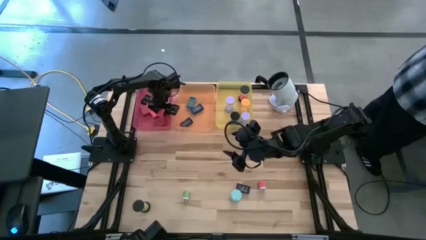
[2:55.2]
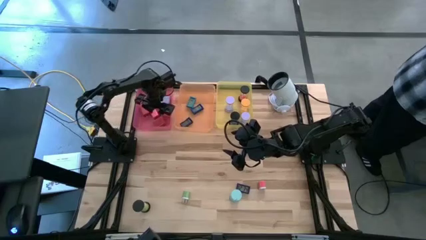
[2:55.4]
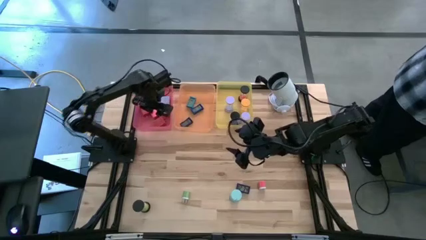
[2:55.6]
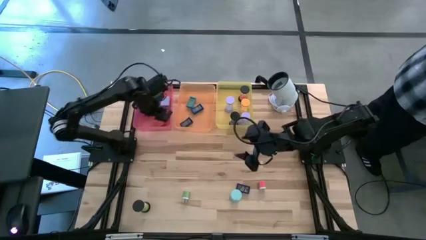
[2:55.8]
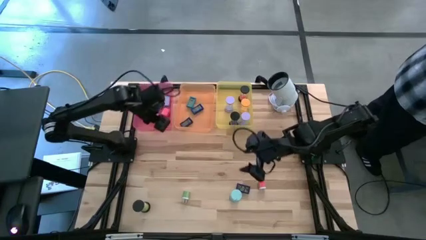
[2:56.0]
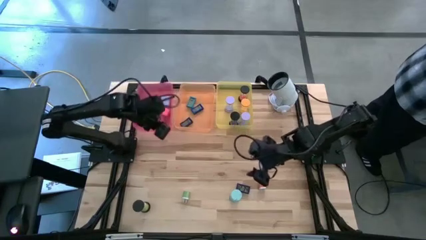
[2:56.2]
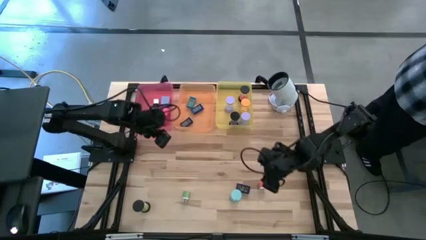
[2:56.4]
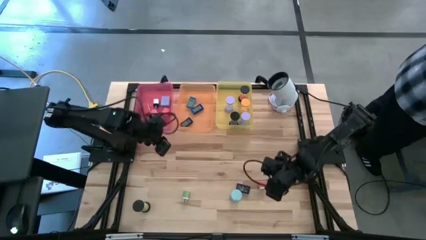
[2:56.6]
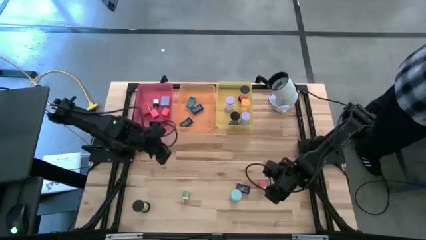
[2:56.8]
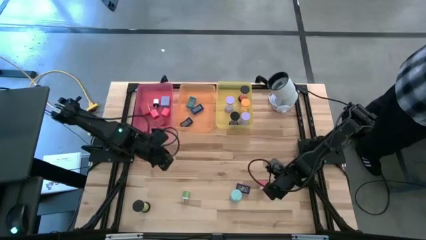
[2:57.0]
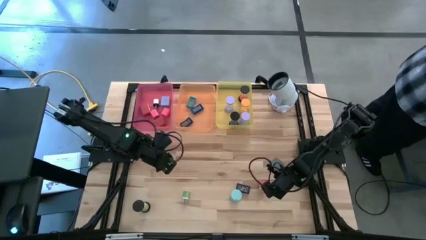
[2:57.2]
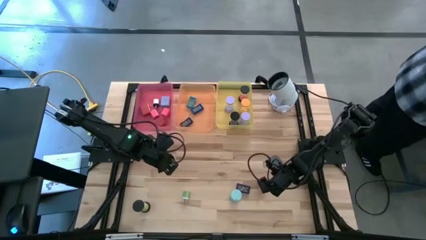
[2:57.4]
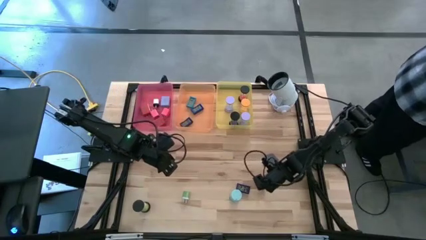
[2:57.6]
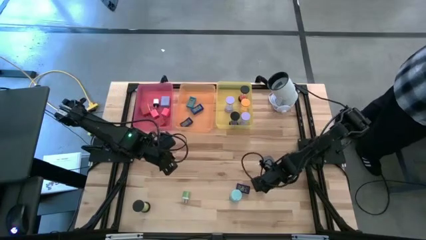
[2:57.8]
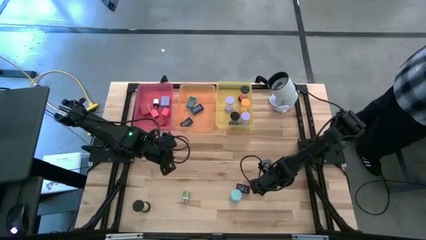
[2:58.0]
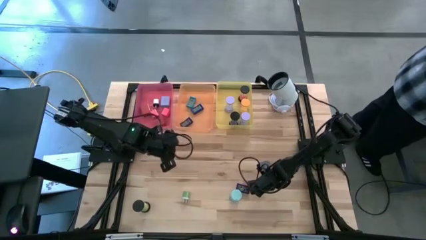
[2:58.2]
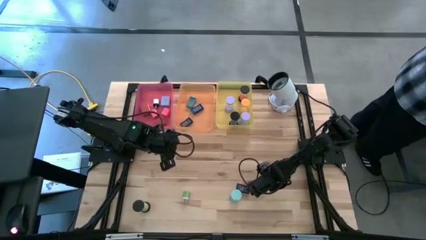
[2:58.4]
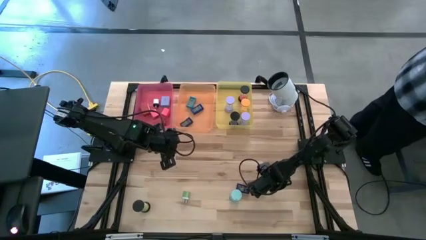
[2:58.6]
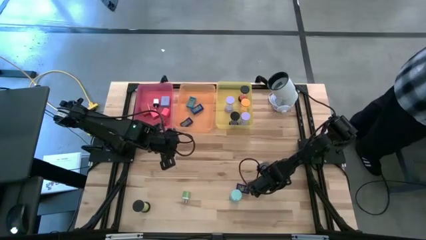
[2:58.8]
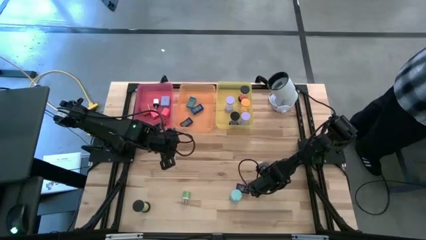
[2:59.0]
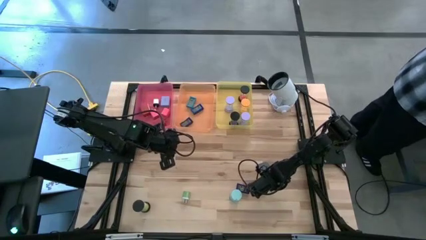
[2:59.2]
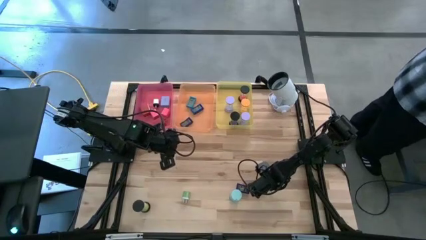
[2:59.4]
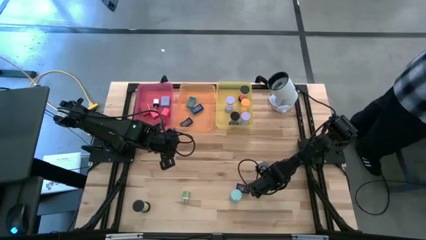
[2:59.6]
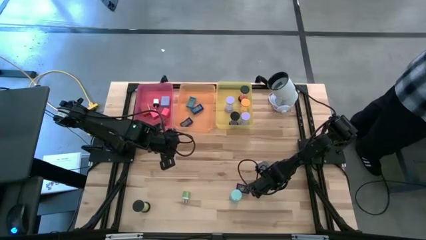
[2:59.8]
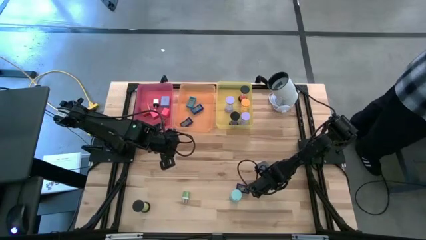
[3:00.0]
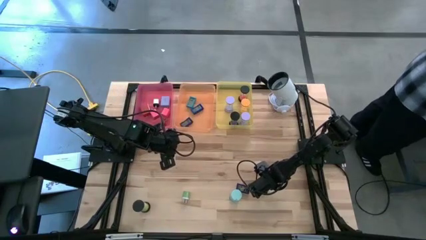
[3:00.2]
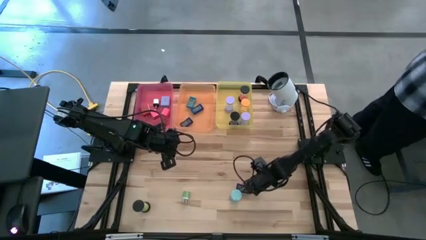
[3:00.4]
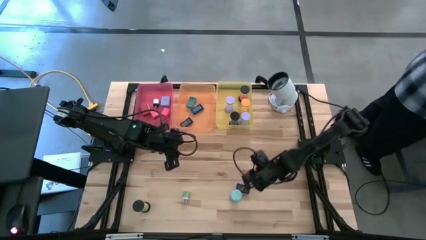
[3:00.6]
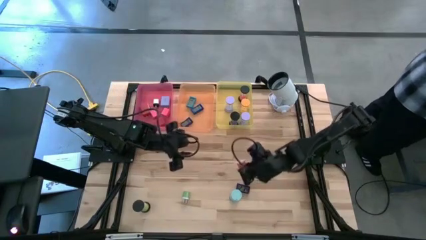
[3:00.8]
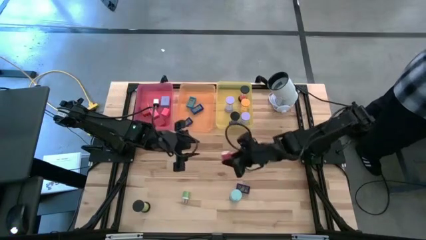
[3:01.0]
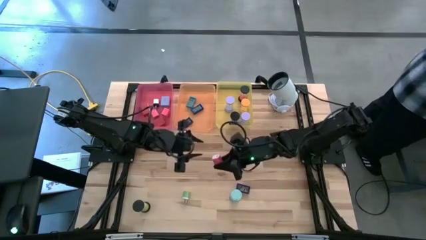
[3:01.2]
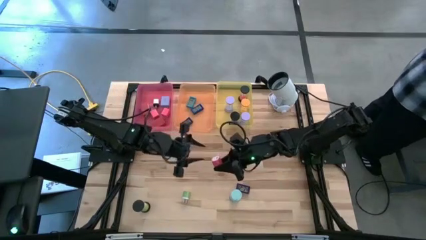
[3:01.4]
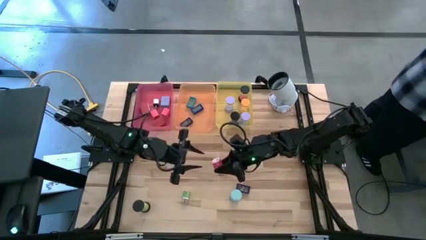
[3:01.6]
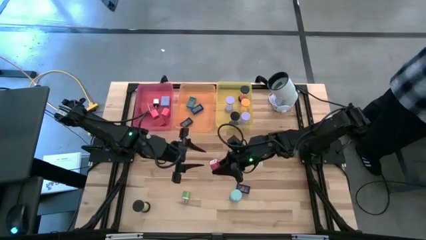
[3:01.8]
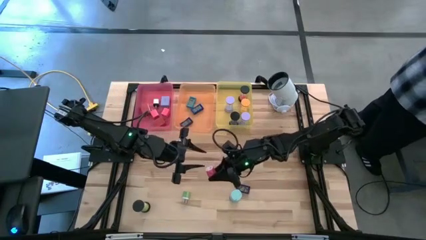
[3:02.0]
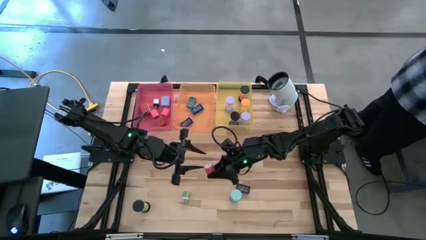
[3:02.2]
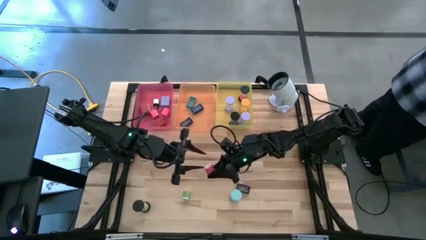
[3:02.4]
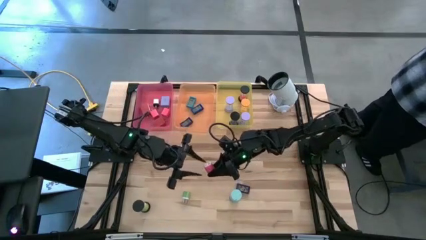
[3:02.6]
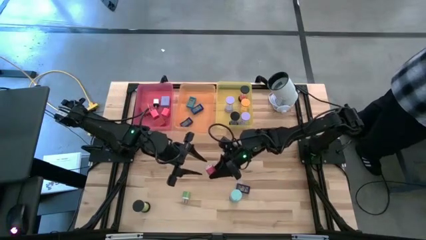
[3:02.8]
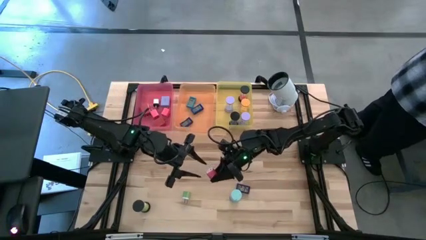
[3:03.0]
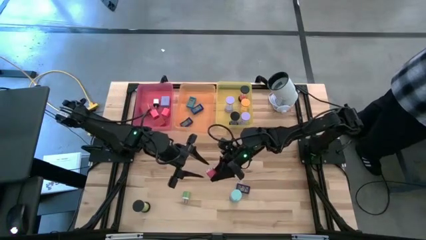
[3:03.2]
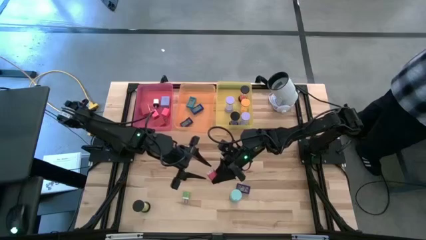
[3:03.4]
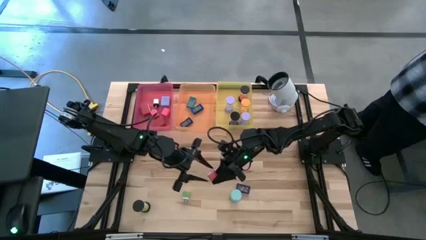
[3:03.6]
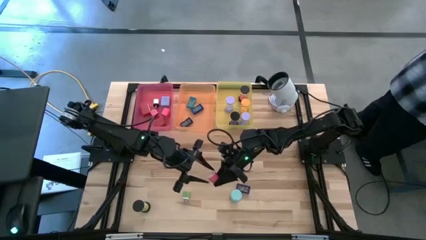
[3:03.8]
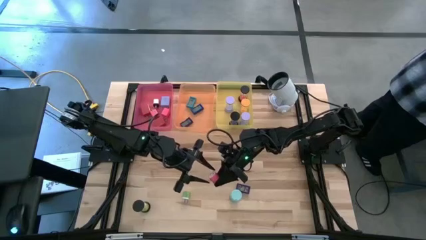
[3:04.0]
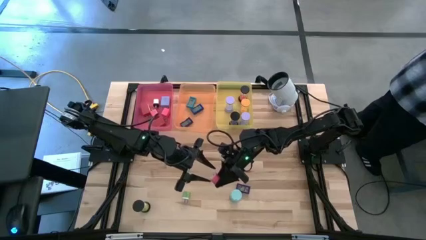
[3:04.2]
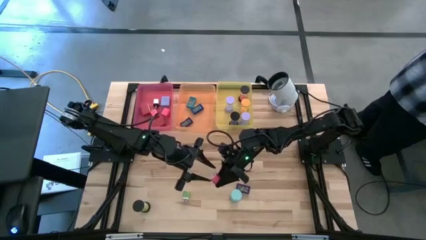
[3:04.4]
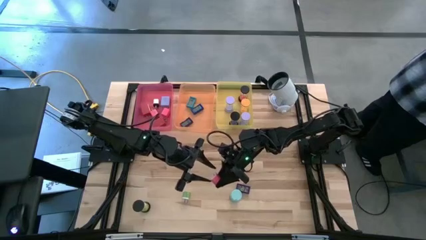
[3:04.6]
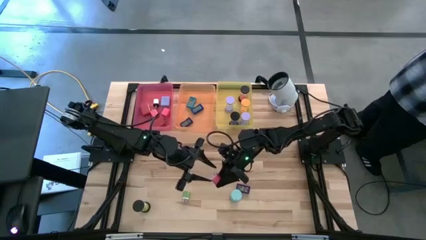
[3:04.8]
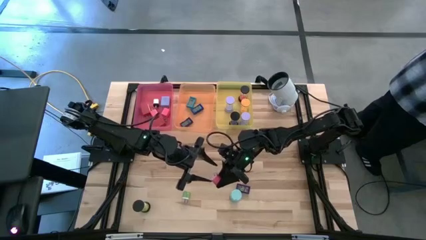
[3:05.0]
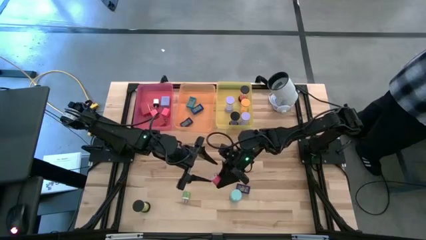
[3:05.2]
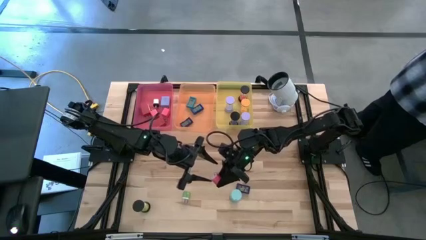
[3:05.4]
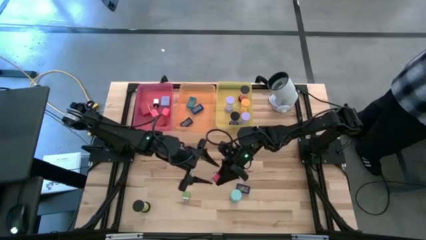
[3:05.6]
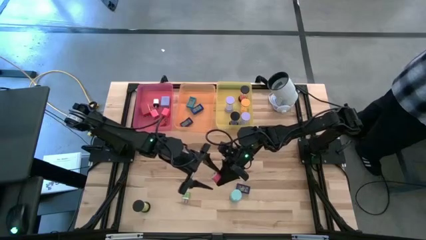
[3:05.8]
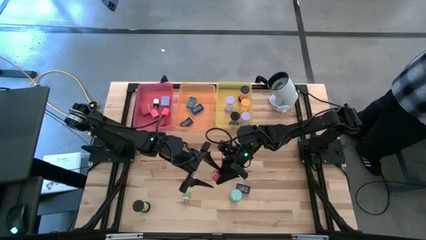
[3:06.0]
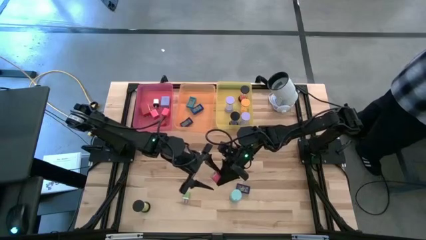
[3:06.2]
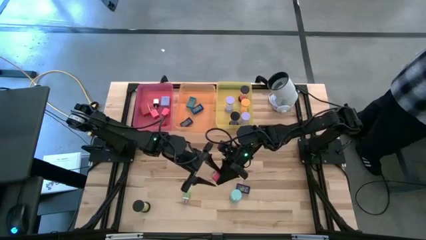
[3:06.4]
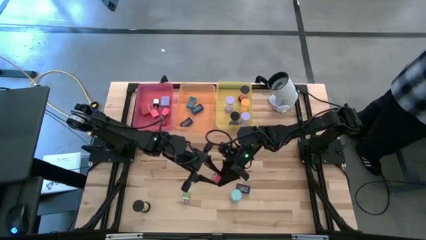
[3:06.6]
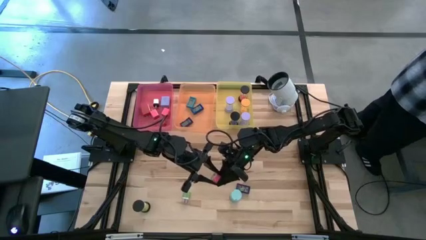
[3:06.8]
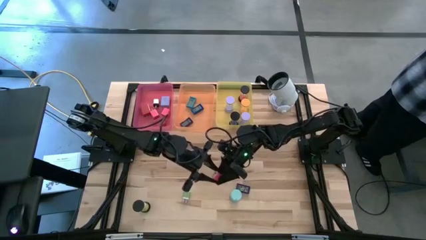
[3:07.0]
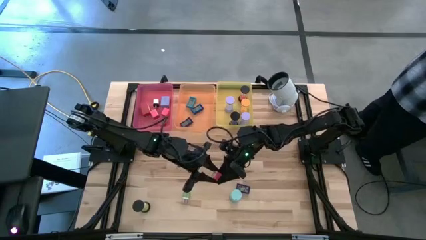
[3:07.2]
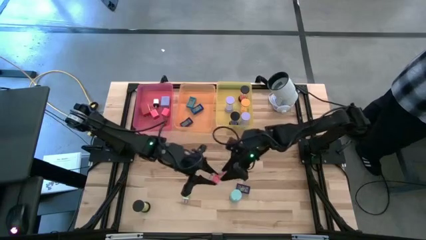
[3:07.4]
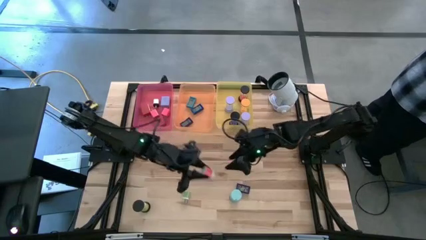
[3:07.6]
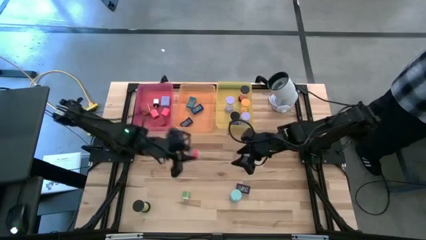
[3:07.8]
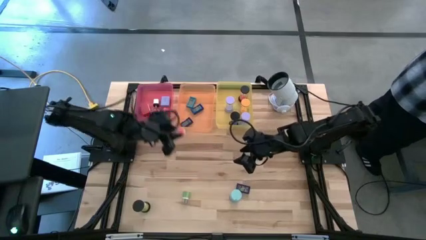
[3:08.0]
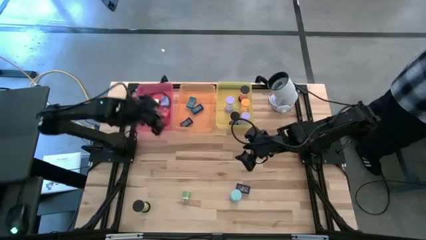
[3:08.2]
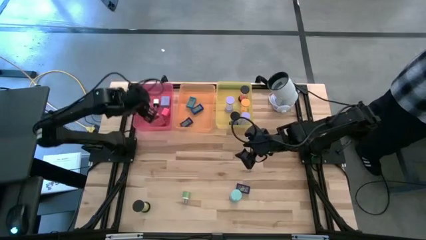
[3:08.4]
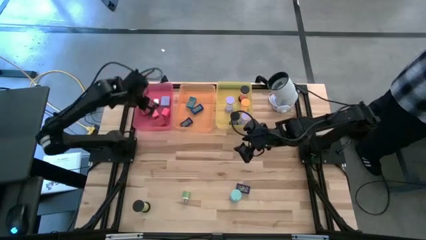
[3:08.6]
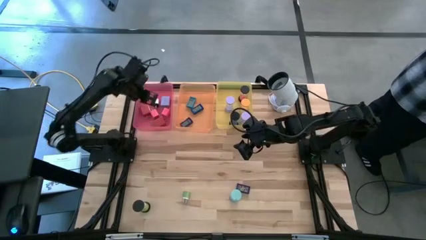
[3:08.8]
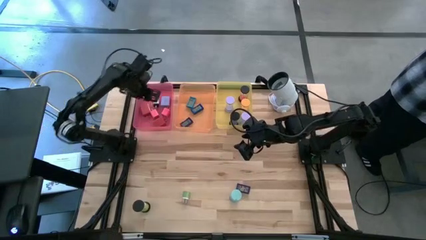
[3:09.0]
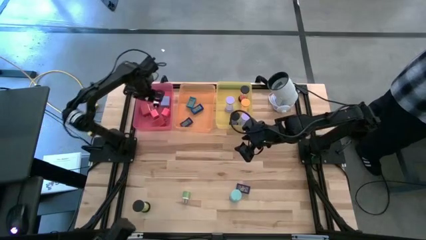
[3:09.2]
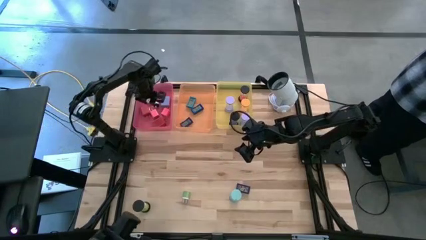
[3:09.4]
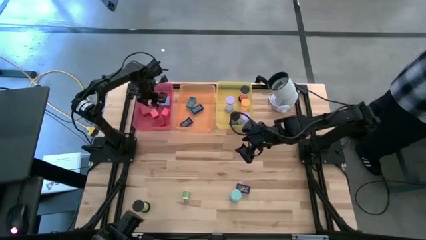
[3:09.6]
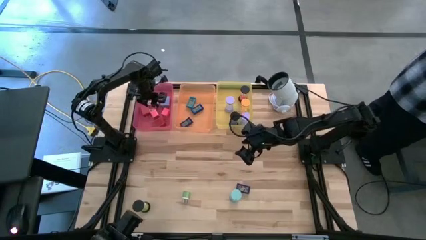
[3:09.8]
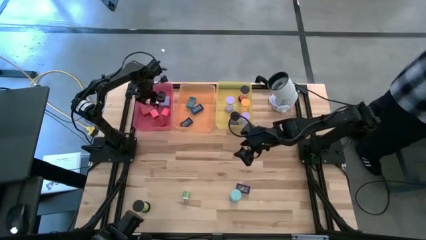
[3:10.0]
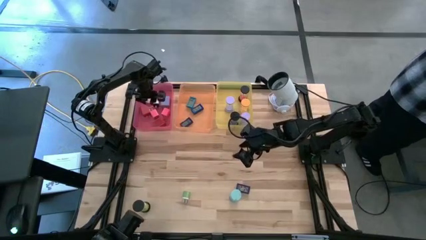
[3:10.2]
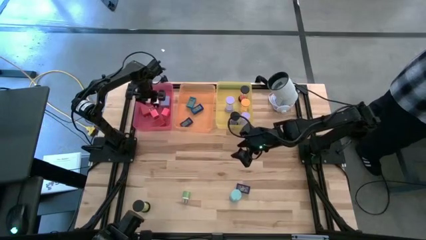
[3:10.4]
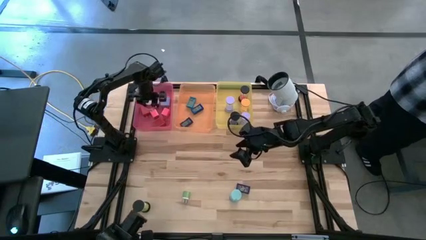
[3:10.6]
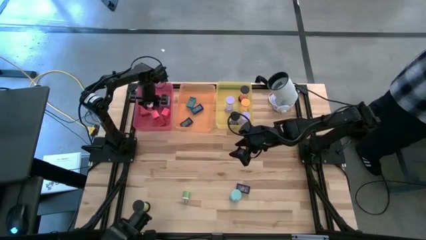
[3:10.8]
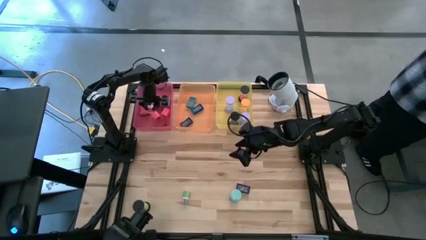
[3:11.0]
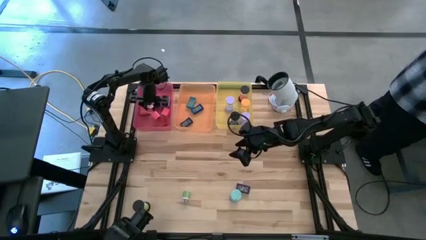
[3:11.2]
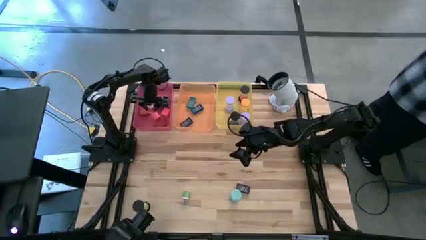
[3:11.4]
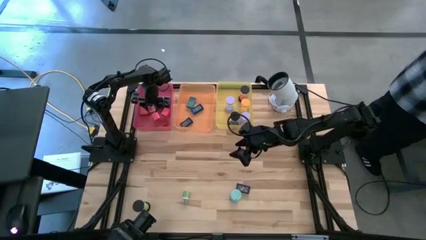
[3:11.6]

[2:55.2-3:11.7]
Task: Pick & Place Office items
Put the pink white charger adapter into the red bin

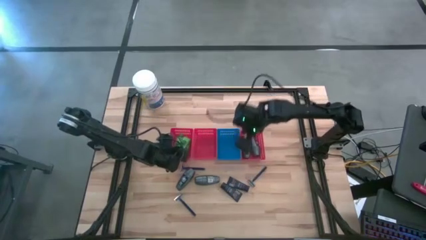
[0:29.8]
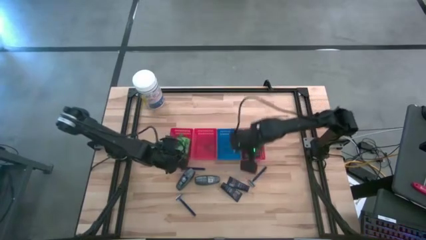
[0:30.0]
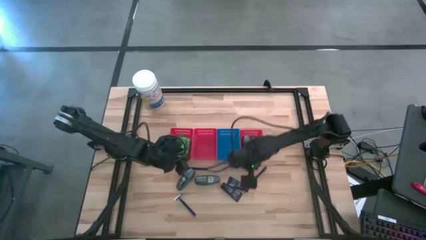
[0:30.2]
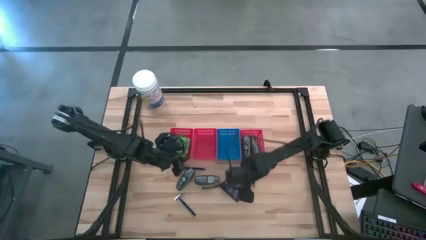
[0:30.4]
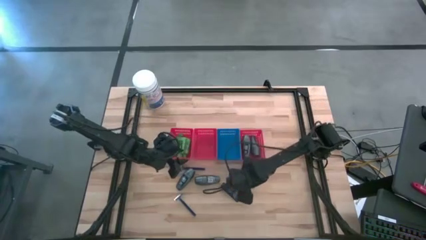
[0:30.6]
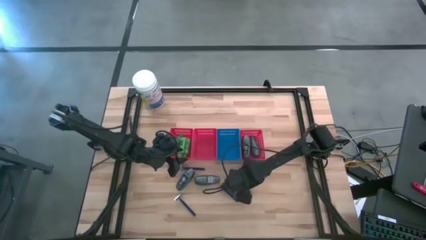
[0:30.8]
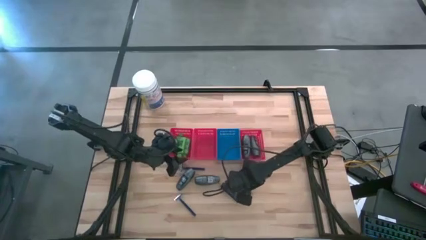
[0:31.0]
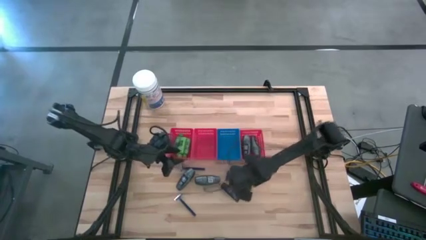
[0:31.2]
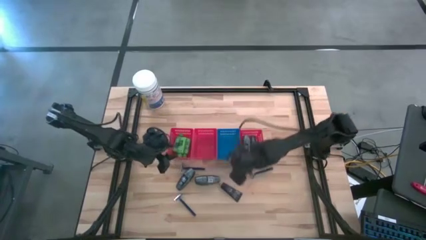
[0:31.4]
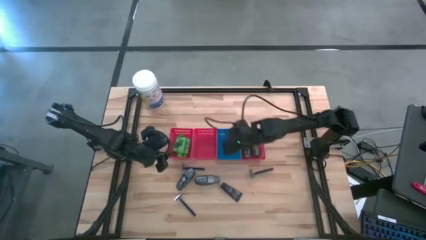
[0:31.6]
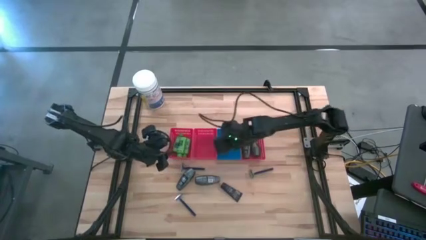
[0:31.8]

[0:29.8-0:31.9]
Task: Pick & Place Travel size toiletries
Put the blue shave cream into the blue bin
